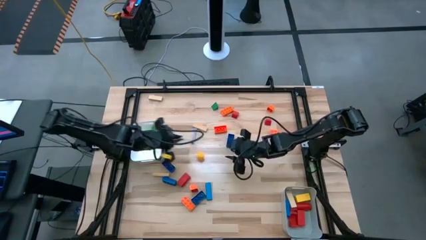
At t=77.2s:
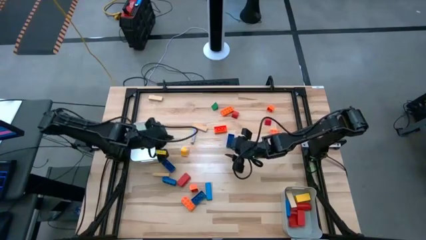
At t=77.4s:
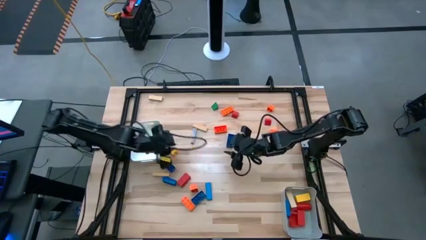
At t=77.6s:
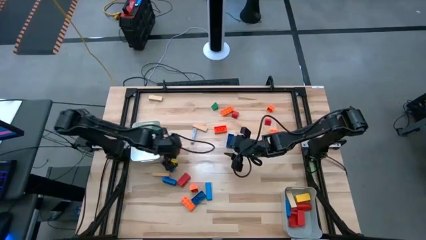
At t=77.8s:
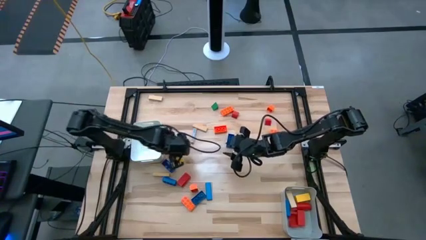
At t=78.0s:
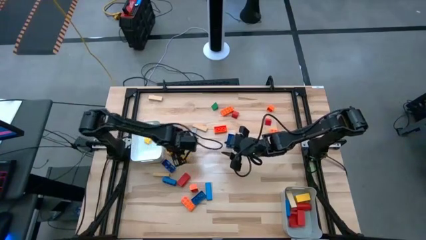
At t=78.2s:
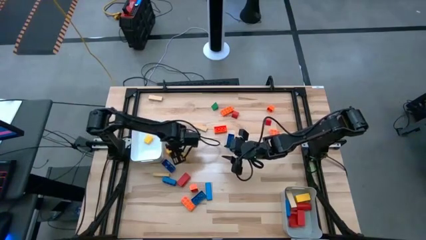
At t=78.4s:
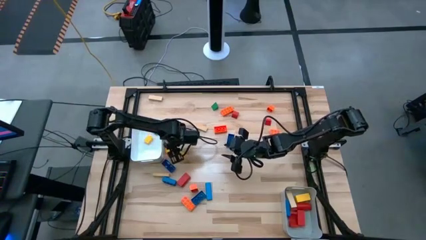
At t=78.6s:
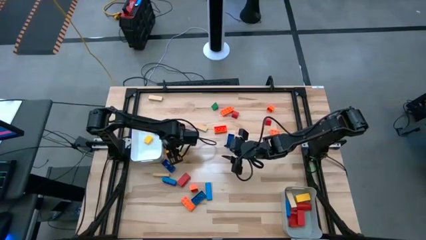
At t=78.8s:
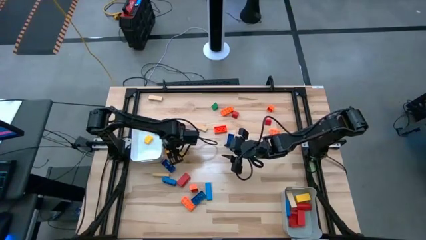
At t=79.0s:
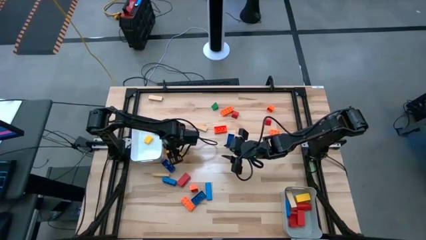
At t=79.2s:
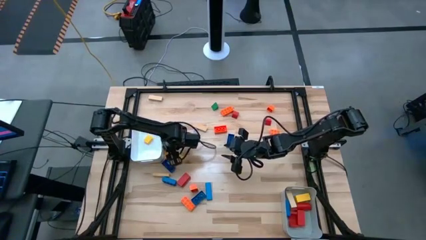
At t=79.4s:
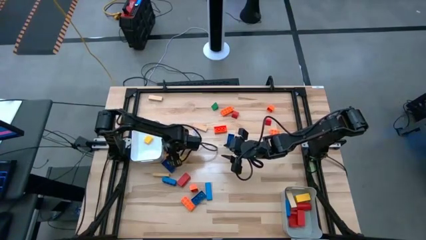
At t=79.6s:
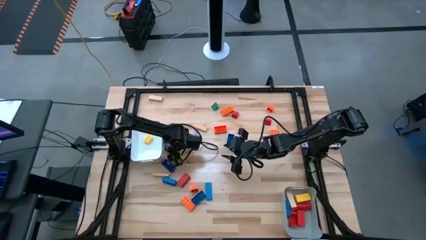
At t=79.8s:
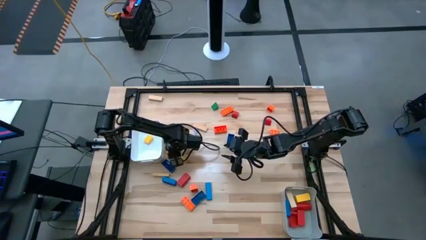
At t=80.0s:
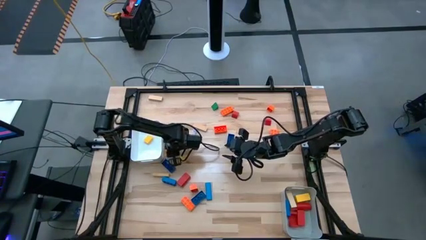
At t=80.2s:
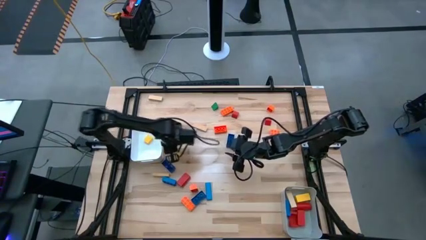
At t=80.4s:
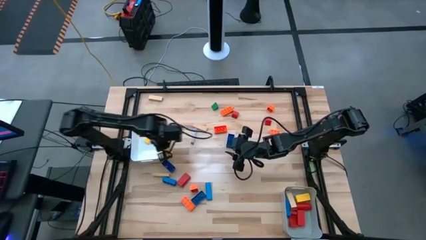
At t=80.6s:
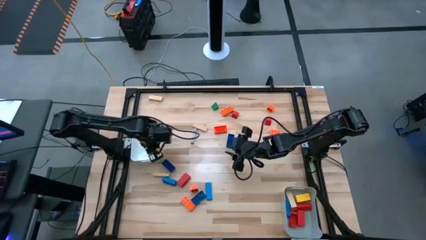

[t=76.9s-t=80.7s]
Task: Sort blocks by size
Put the yellow small game piece into the white bin

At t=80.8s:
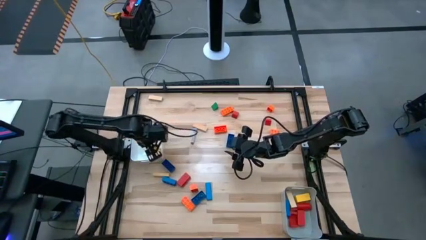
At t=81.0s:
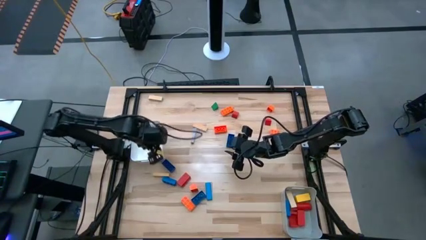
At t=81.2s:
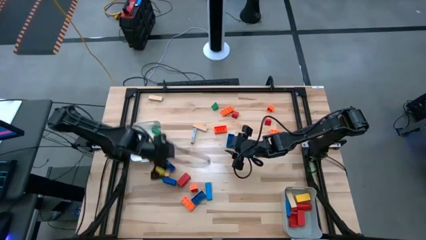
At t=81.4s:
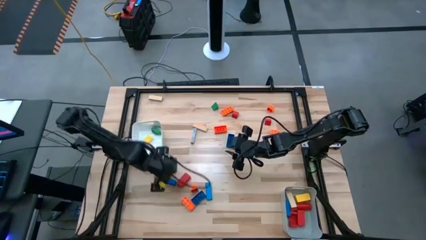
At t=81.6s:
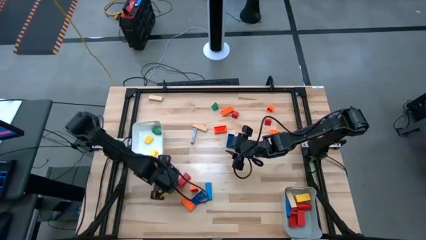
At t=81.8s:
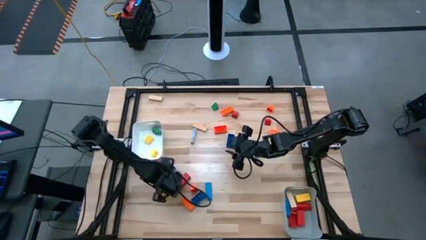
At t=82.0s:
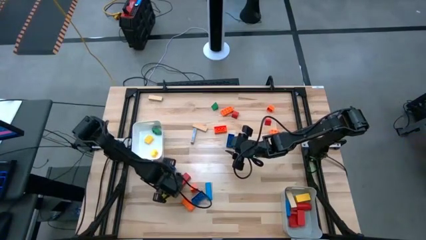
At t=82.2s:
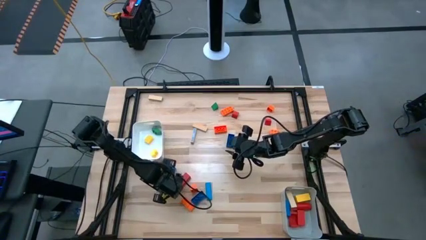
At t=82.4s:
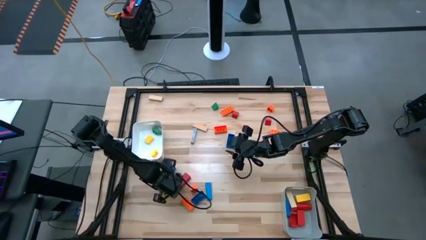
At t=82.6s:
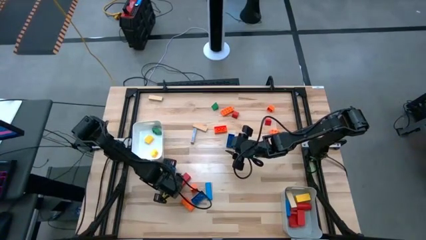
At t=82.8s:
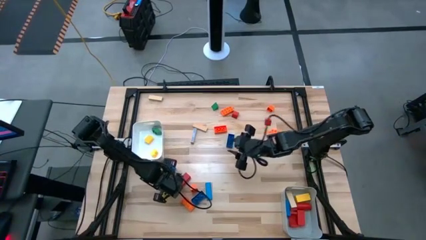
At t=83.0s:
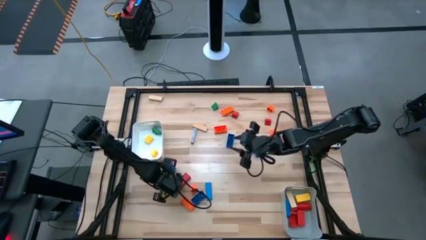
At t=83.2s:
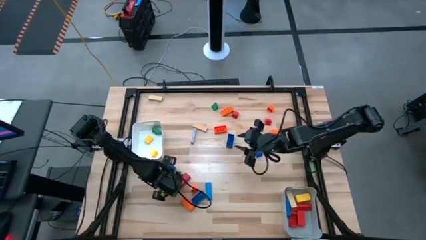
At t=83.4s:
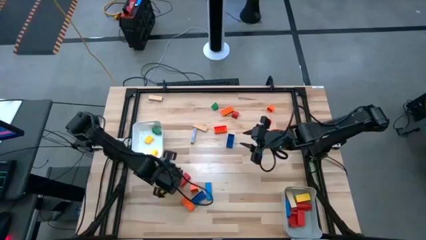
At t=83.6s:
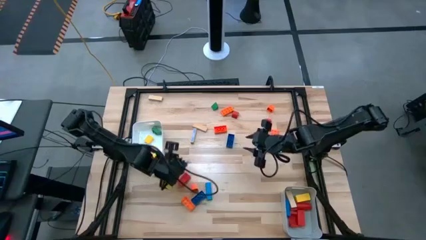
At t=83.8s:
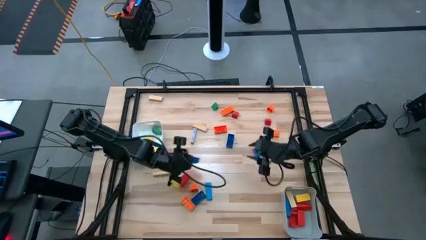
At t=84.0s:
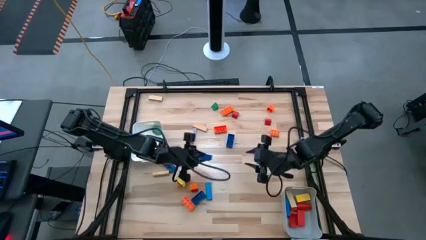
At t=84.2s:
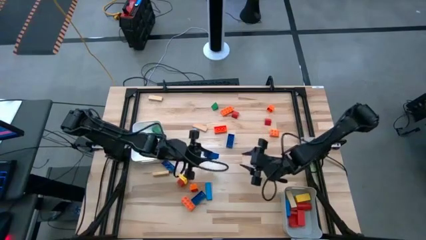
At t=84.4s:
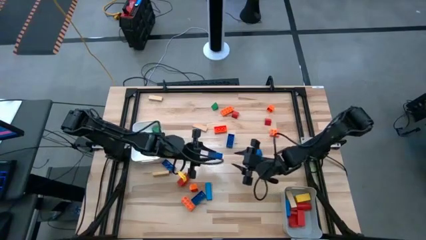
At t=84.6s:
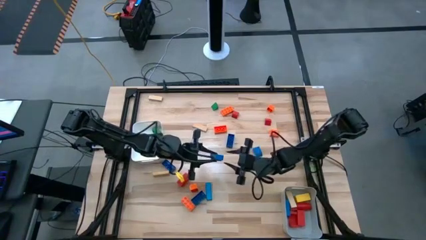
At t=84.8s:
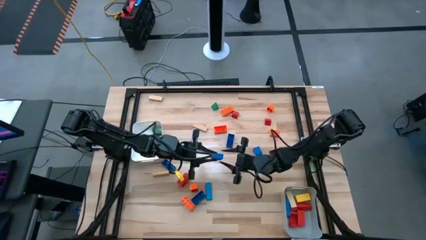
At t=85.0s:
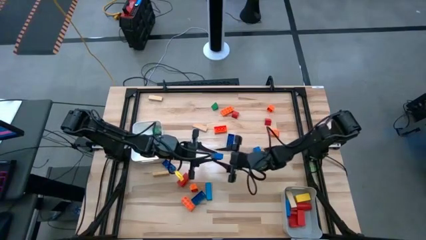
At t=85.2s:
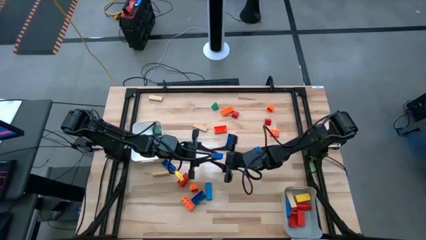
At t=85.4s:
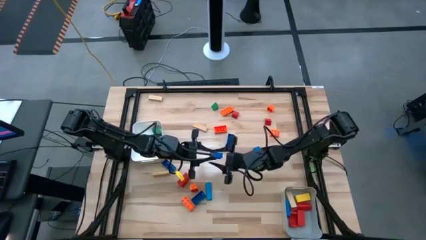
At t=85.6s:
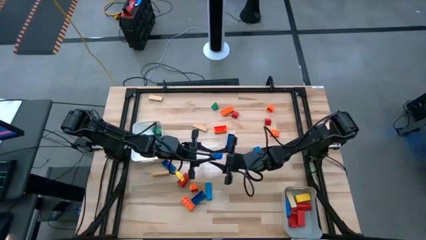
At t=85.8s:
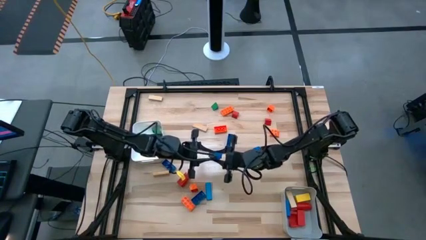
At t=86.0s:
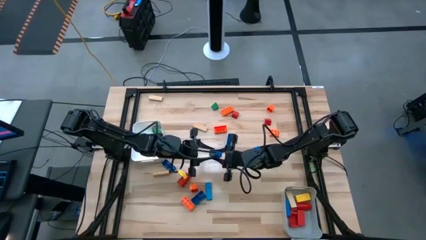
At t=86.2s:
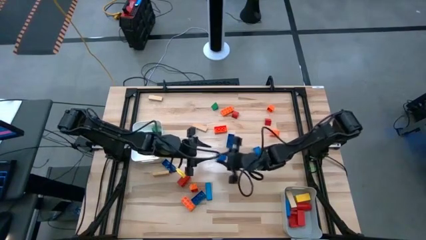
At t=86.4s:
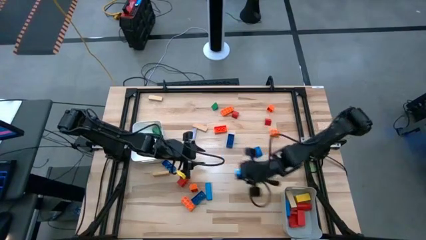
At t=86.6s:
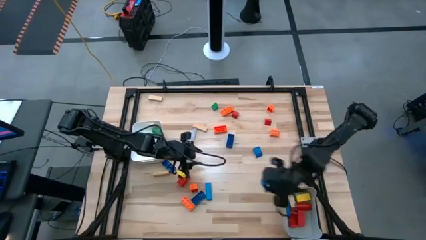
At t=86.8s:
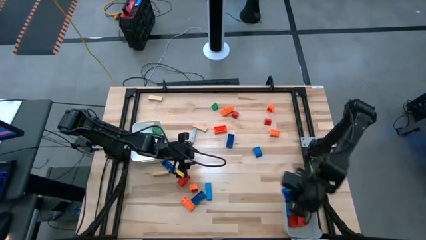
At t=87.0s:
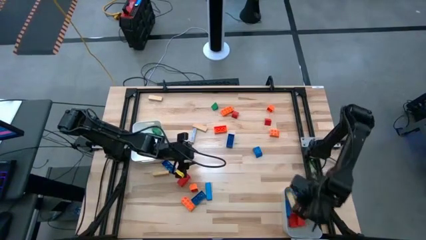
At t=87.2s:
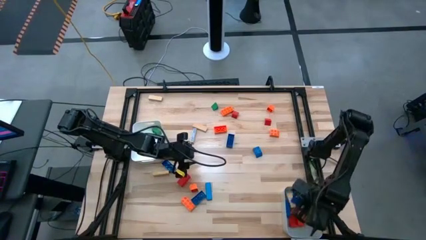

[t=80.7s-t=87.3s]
Put the blue large game piece into the gray bin

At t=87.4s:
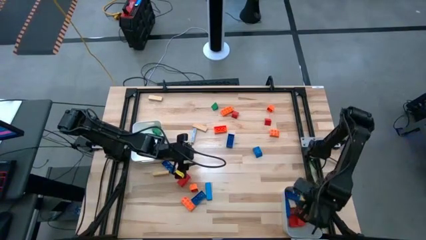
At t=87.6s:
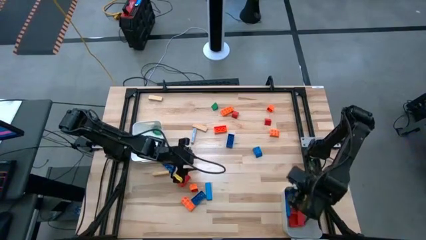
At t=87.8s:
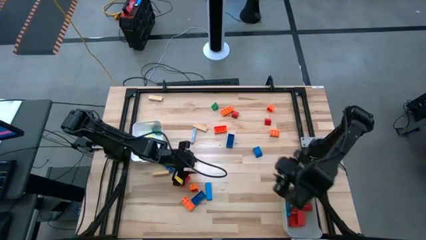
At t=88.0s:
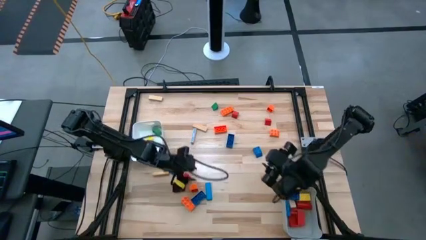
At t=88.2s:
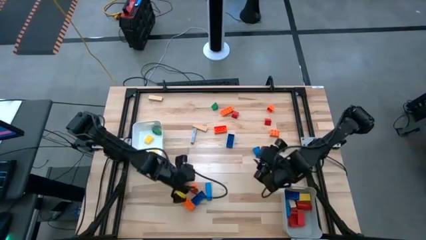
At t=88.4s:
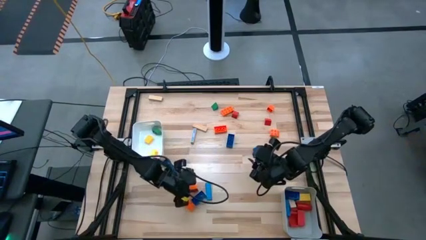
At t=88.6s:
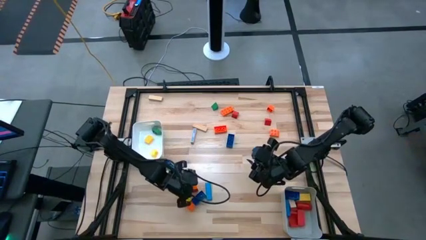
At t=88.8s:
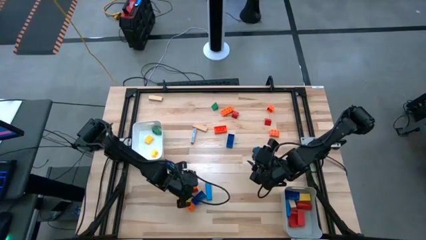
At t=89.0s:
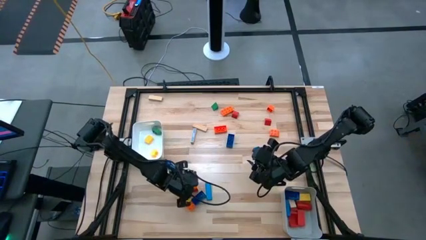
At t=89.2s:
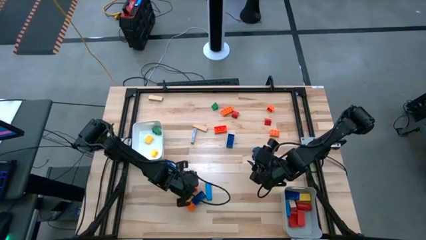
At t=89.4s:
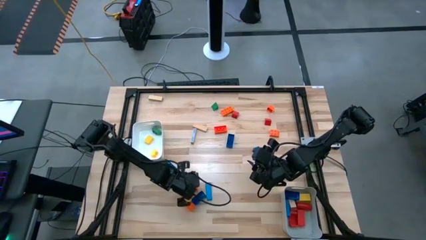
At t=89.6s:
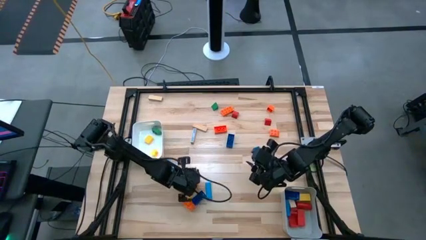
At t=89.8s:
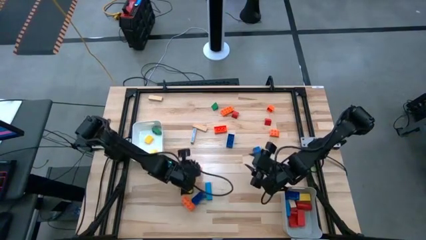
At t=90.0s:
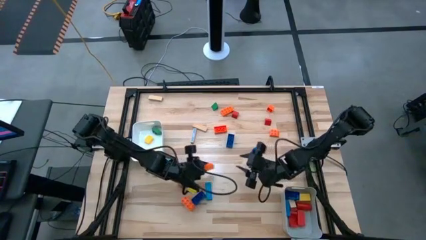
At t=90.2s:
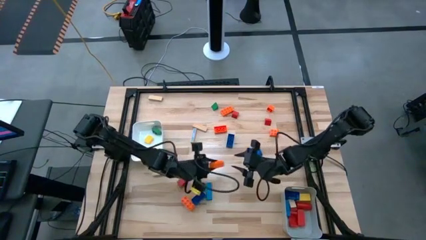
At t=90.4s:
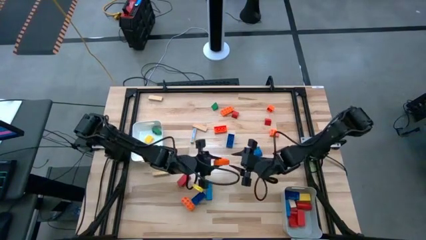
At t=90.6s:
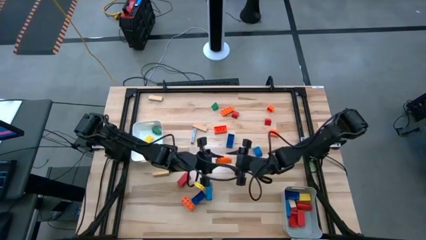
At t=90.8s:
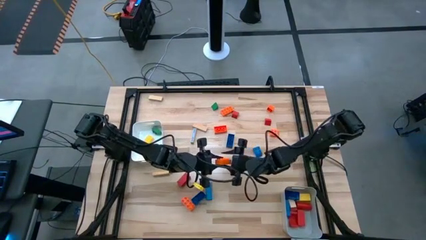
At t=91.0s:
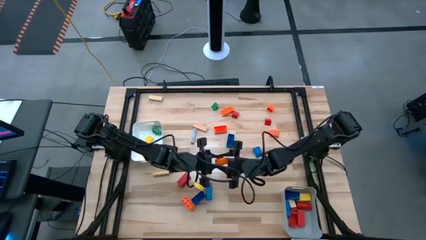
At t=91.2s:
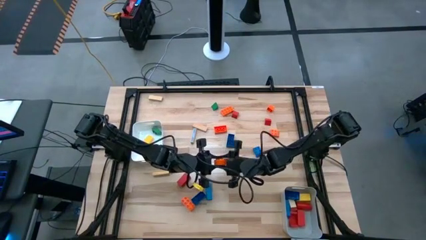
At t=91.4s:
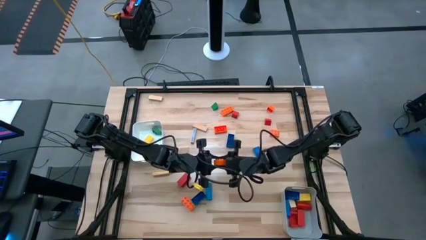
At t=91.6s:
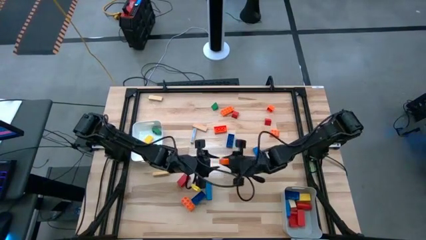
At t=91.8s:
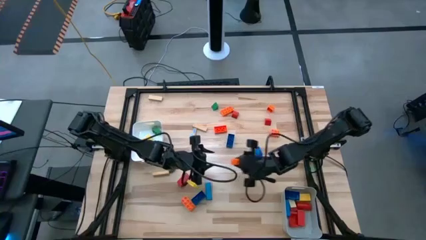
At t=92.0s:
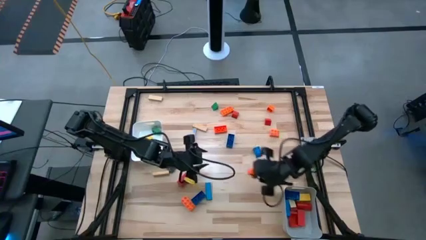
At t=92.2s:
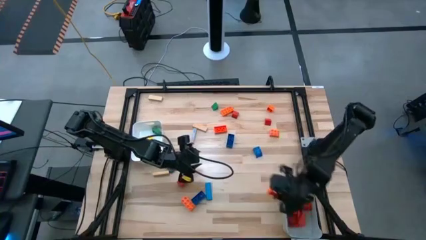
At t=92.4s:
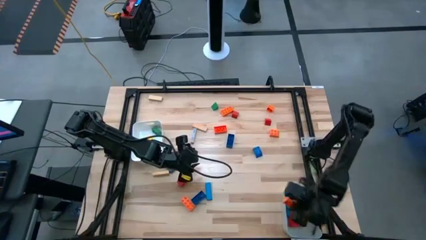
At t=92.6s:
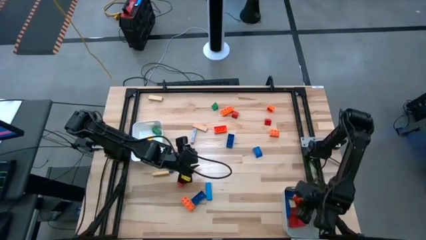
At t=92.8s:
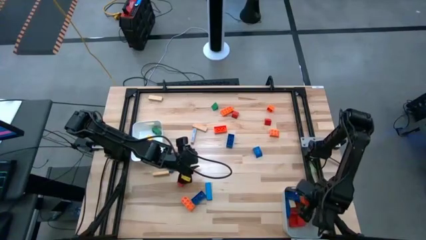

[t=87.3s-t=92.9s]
Put the orange large game piece into the gray bin
